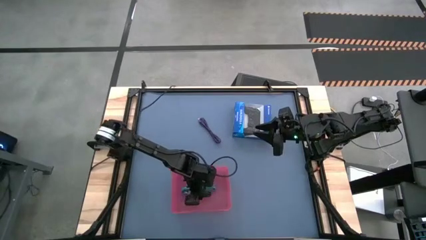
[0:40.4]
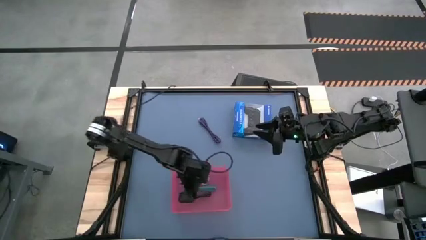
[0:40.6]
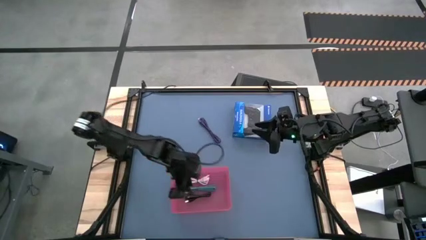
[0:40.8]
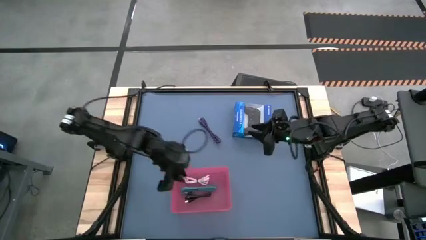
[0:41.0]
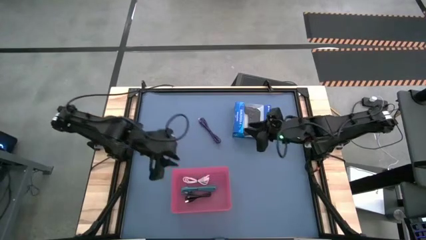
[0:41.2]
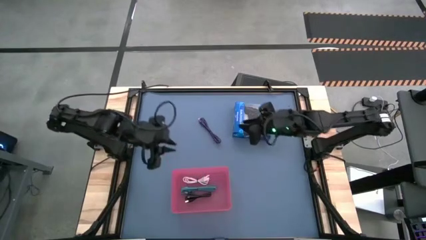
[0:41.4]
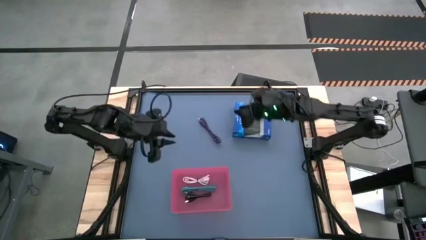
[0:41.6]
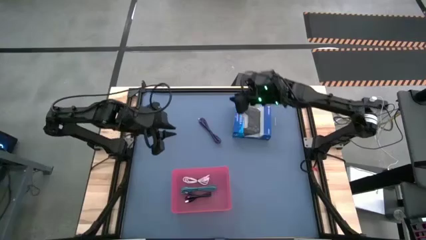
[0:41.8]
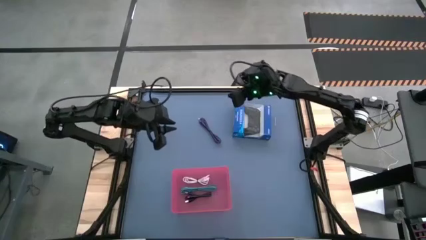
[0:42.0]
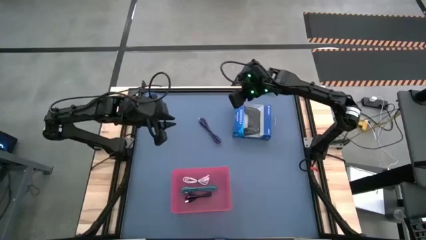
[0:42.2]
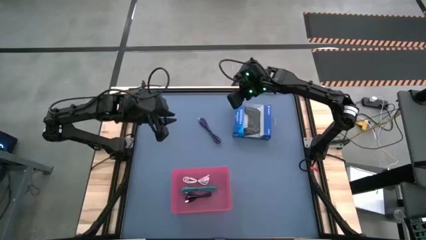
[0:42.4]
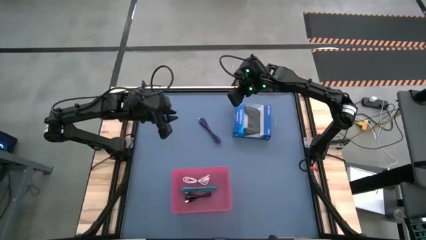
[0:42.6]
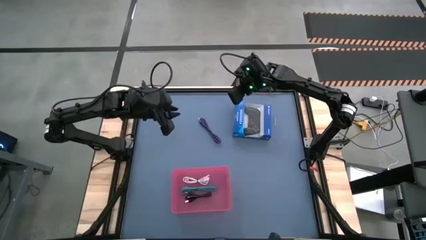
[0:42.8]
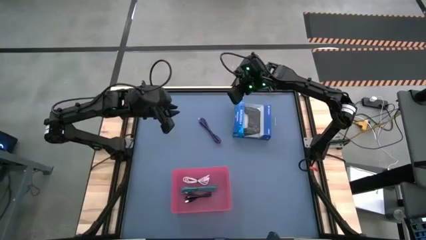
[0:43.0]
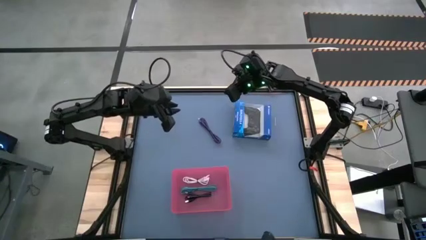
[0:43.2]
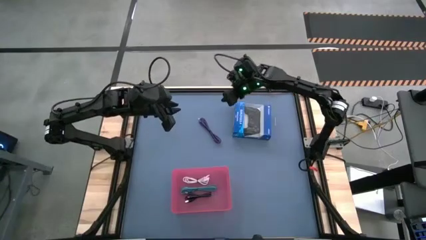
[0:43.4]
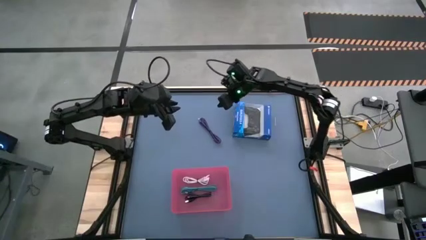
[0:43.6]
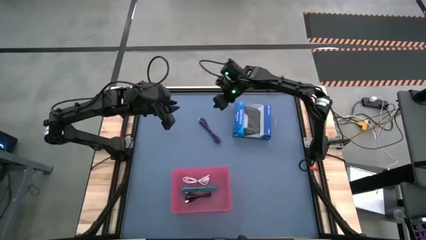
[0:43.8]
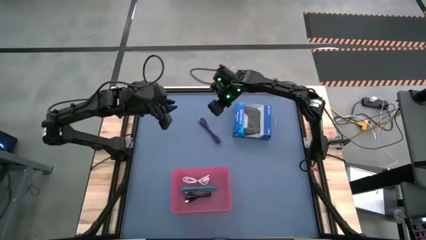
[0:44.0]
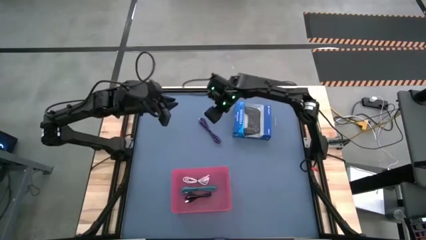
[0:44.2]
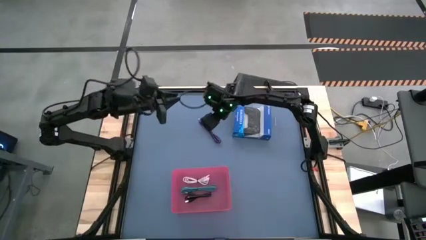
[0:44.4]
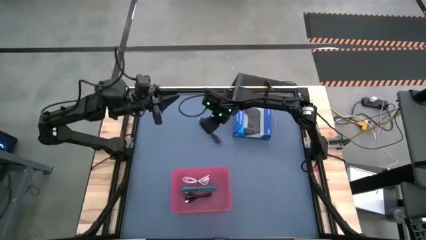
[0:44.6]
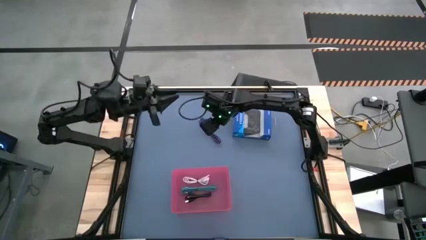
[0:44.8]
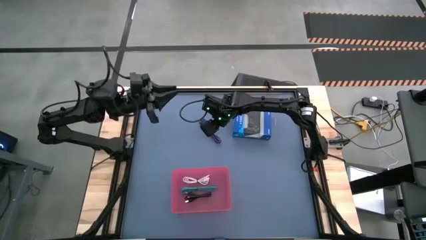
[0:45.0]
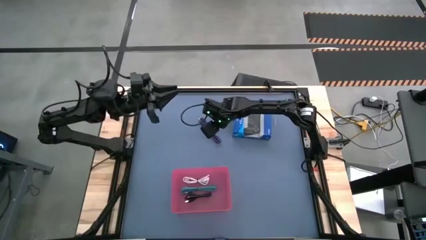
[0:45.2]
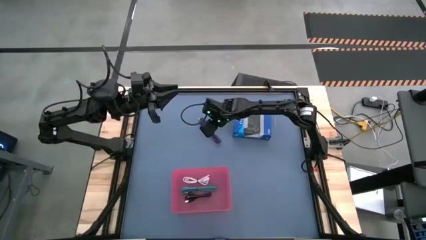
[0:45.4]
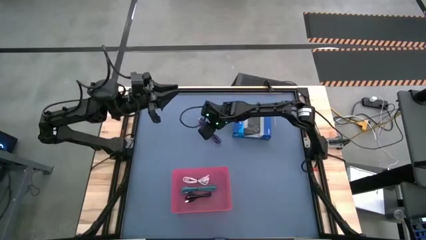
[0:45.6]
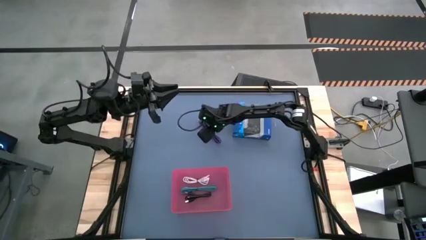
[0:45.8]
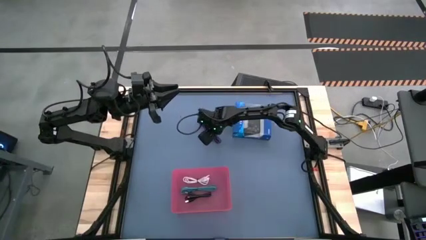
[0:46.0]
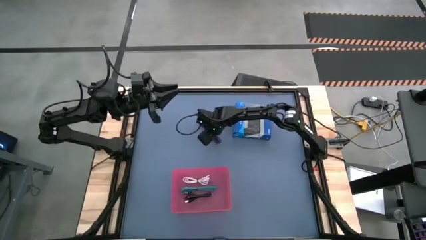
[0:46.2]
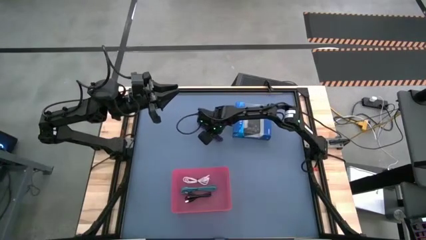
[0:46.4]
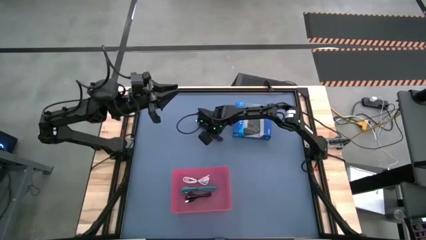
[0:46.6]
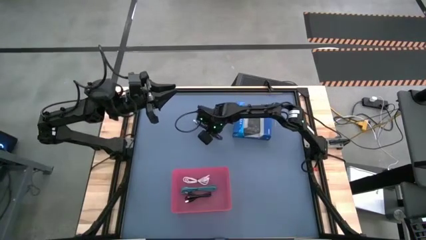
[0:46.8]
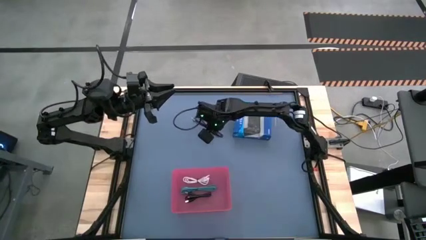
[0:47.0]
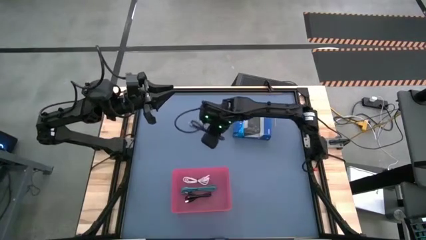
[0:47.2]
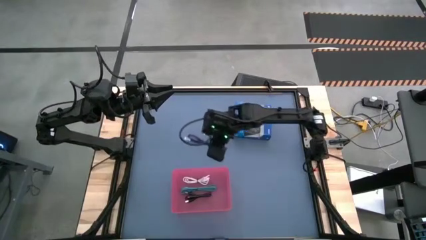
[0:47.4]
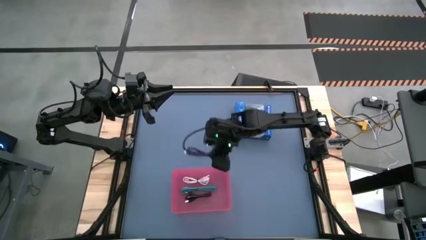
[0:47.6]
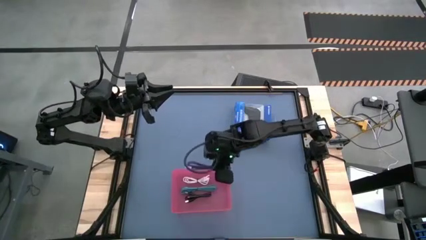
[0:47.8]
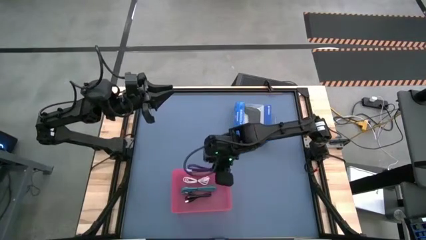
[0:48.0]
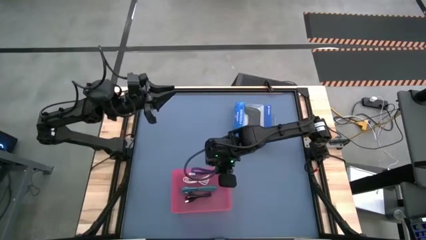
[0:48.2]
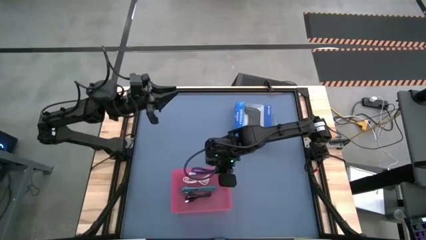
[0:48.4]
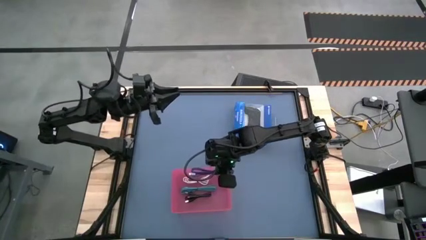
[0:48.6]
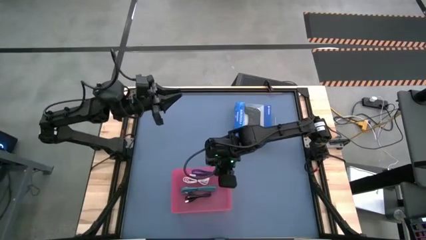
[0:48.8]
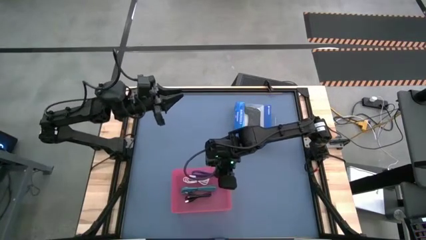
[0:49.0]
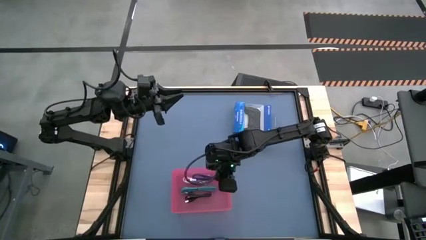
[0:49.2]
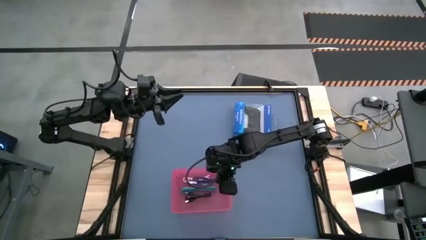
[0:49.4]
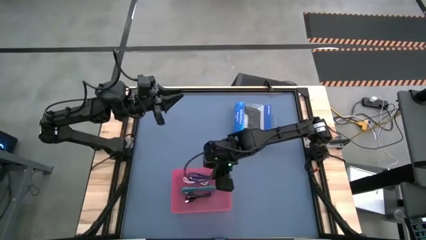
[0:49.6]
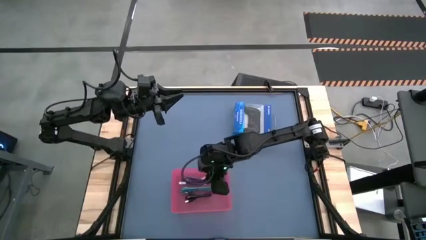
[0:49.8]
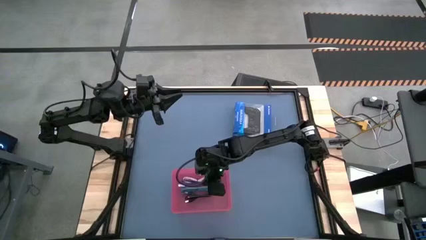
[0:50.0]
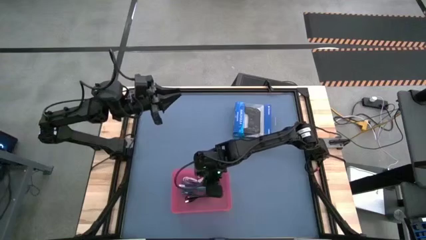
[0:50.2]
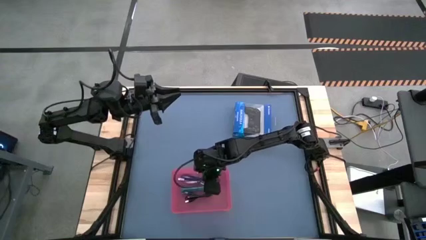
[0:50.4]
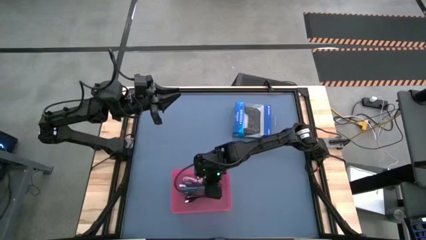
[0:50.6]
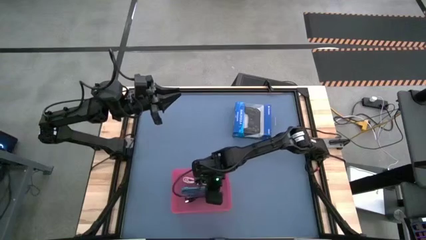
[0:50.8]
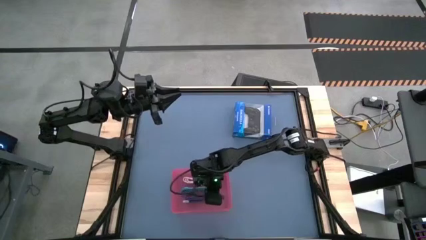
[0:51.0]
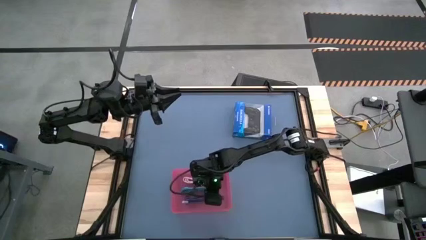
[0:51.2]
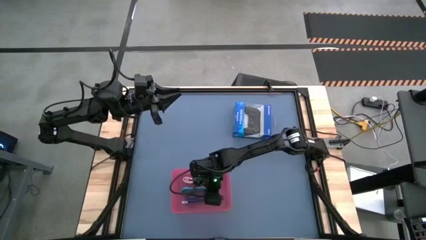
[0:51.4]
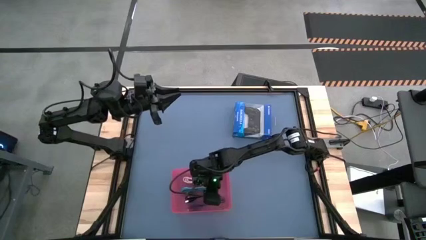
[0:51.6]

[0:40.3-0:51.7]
Task: Pick and place USB-C Cables
Put the black and violet charger cable into the pink bin

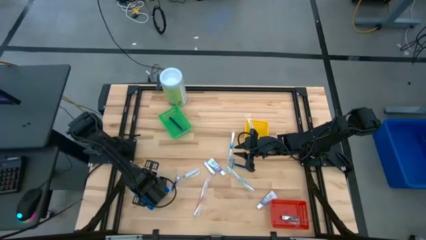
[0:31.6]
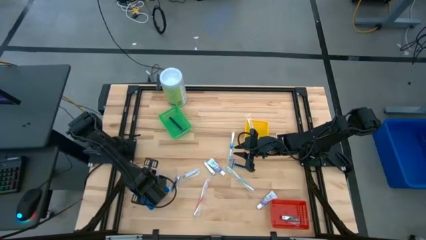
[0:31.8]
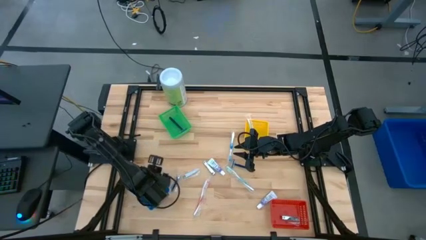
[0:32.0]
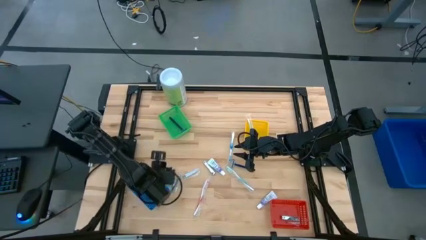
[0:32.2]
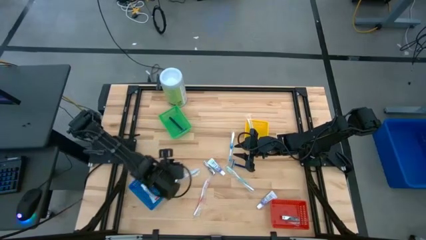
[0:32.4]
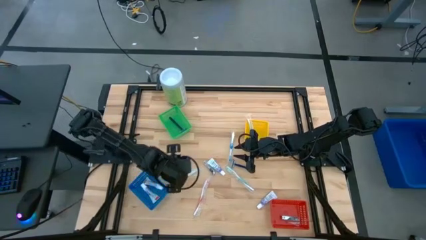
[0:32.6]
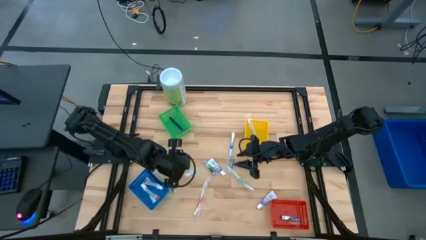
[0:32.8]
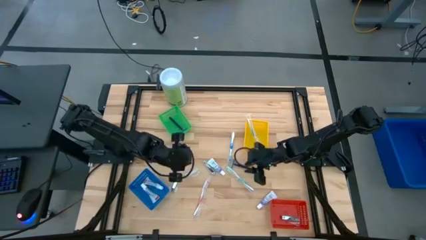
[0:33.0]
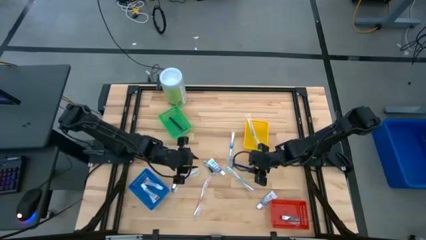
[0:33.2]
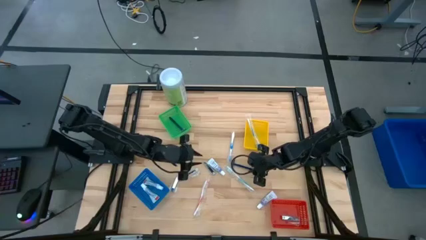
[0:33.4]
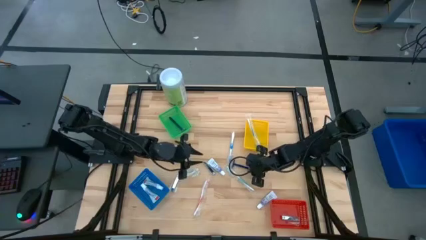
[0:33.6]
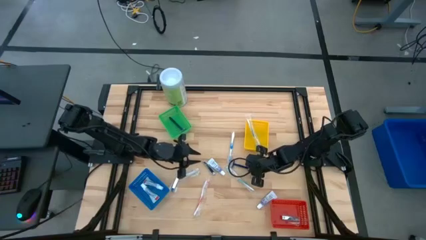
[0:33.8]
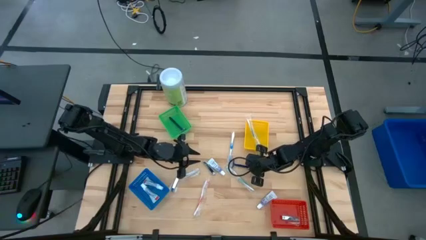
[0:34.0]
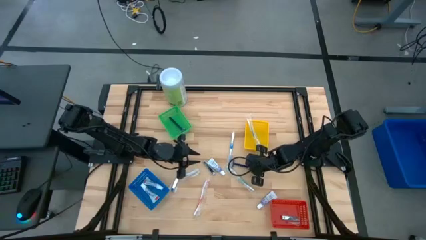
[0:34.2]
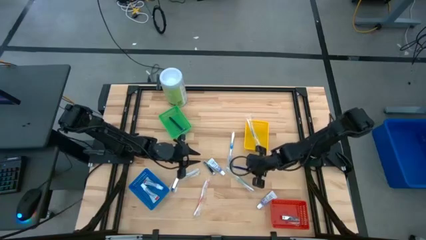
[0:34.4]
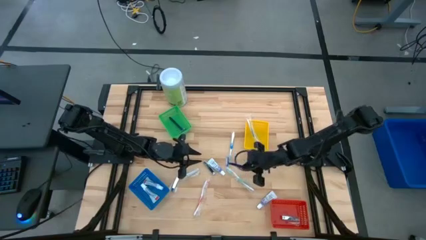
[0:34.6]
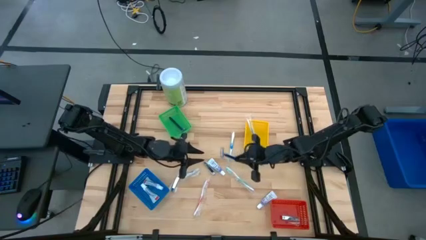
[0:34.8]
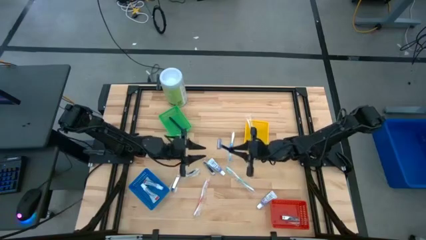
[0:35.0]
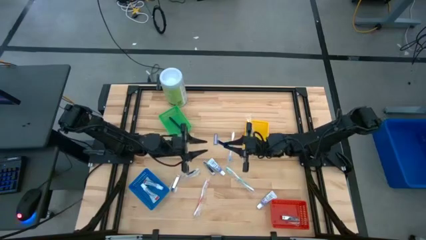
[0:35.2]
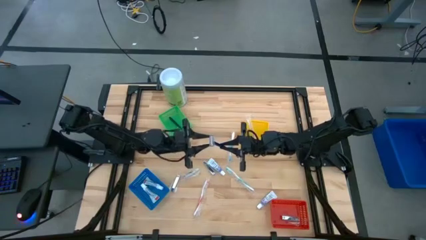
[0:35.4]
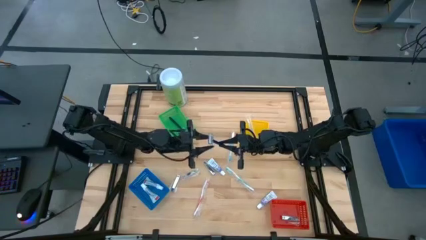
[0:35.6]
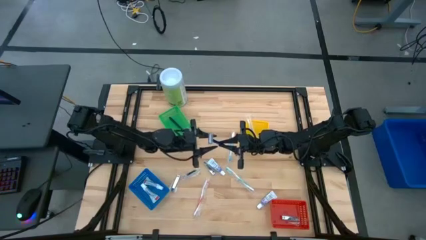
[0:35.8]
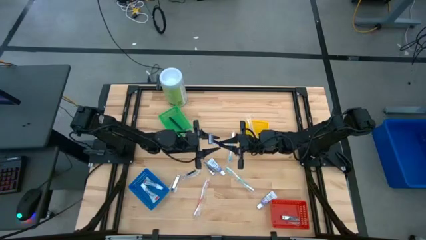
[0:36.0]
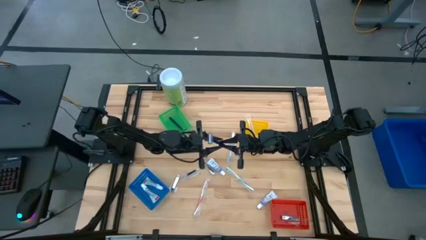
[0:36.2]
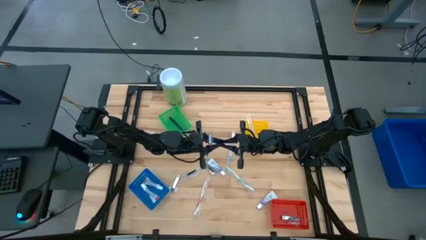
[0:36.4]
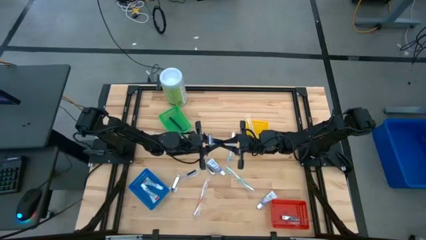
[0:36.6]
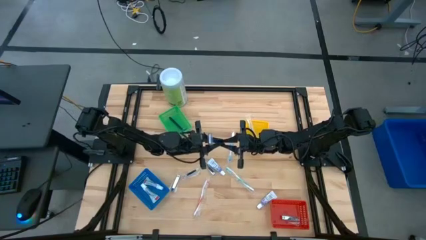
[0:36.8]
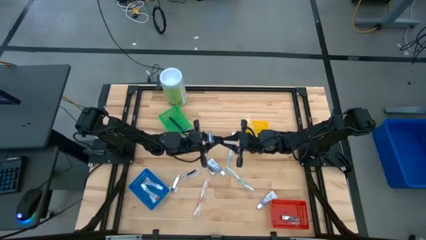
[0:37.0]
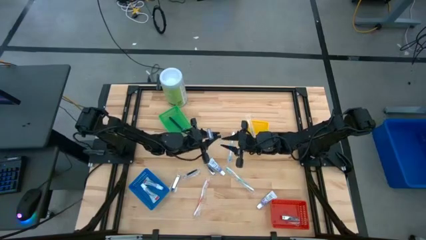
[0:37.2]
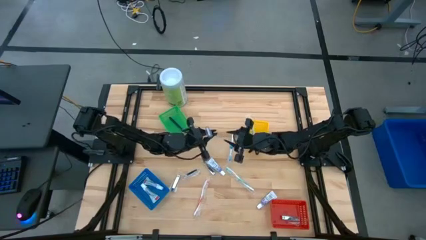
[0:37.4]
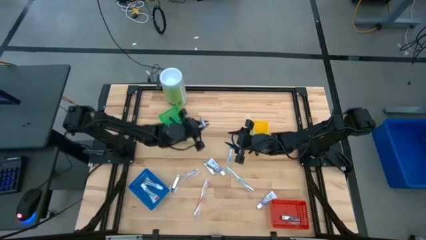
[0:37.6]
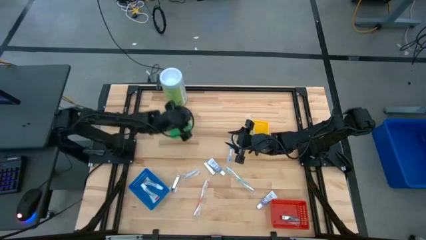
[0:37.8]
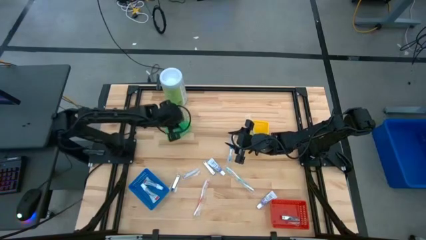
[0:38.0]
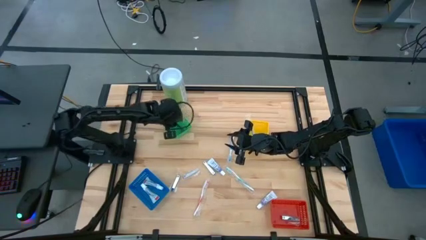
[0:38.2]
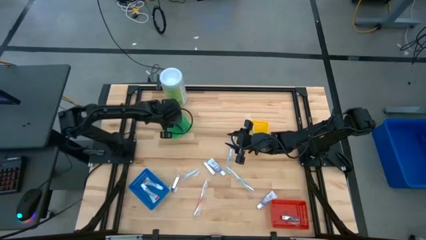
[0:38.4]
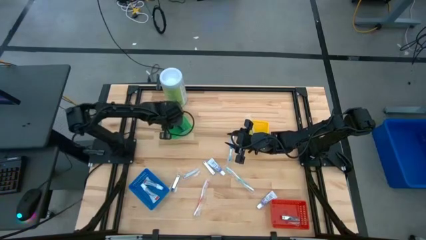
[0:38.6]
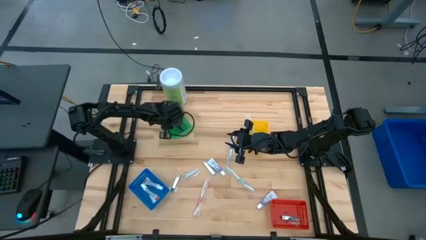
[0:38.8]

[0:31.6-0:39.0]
Task: Pick & Place Travel size toiletries
Put the razor into the green bin
